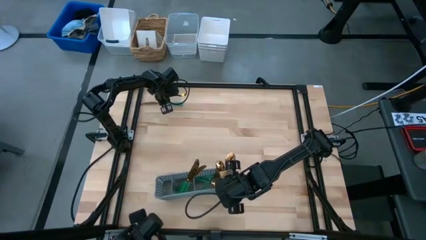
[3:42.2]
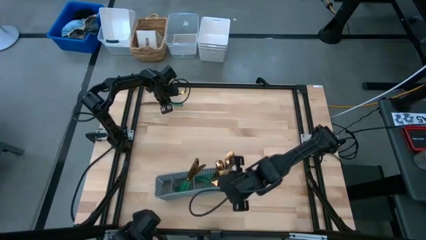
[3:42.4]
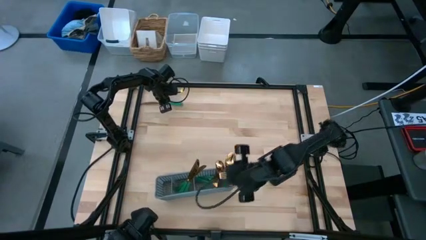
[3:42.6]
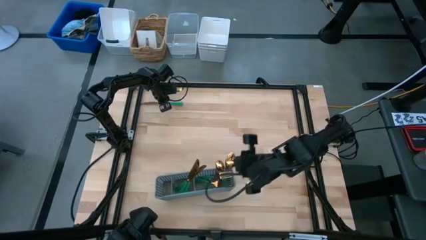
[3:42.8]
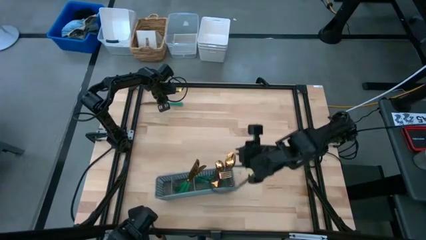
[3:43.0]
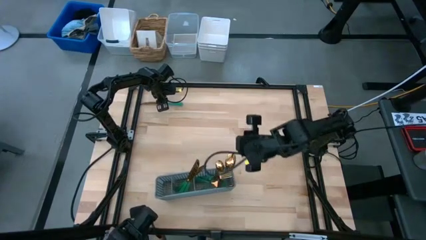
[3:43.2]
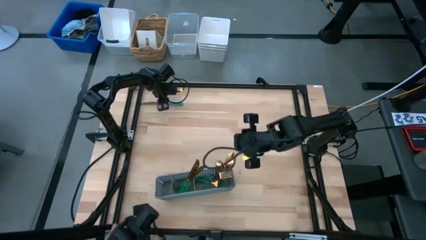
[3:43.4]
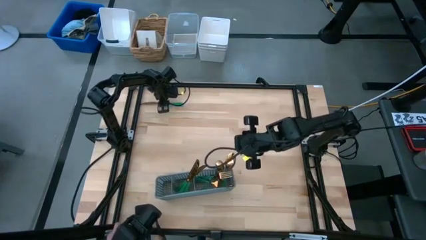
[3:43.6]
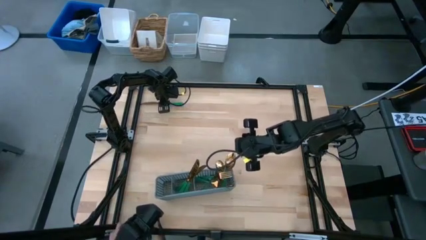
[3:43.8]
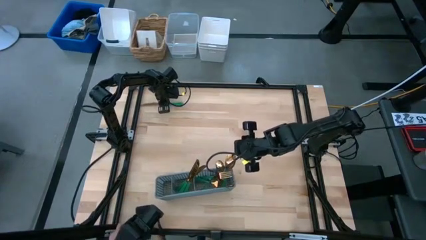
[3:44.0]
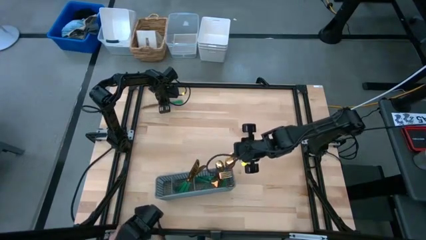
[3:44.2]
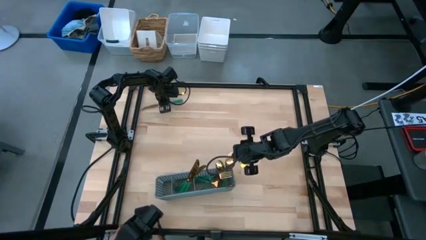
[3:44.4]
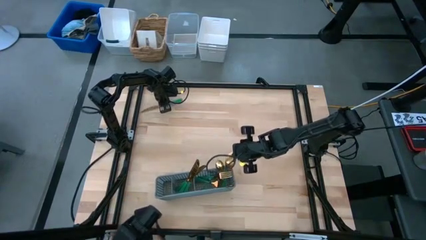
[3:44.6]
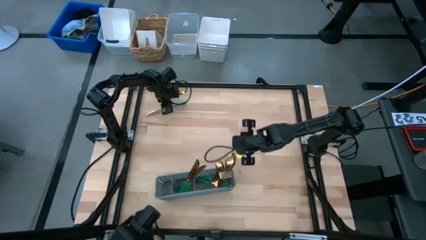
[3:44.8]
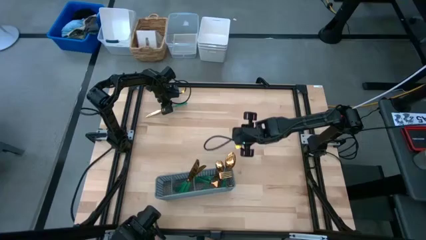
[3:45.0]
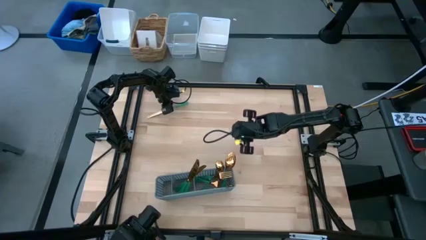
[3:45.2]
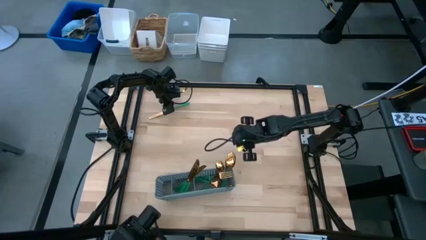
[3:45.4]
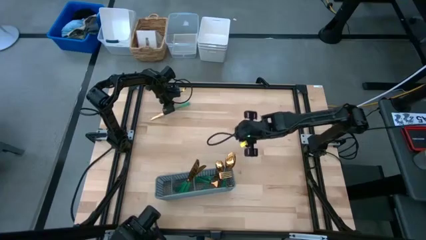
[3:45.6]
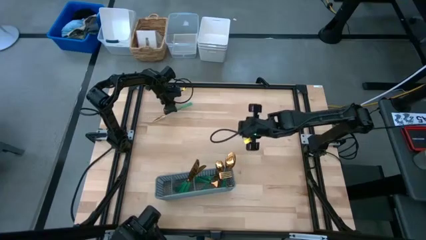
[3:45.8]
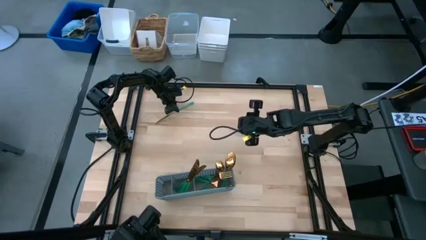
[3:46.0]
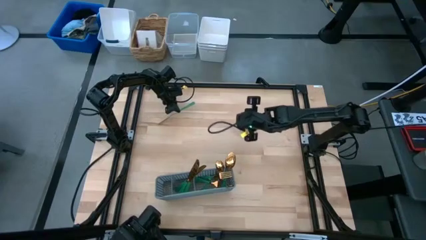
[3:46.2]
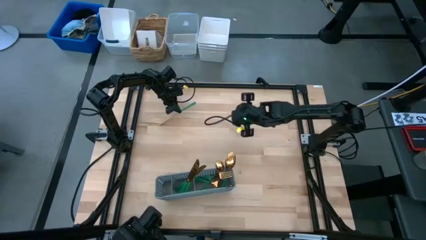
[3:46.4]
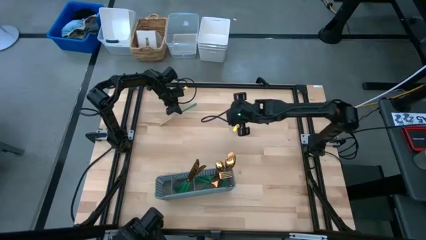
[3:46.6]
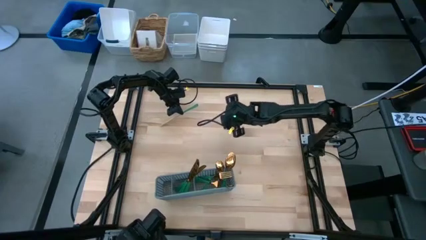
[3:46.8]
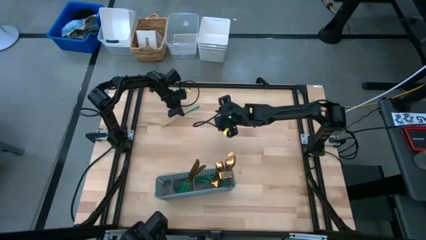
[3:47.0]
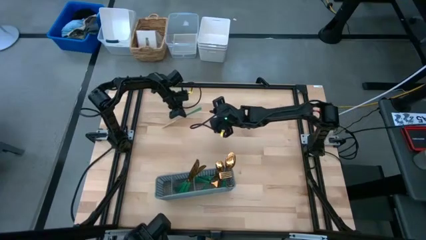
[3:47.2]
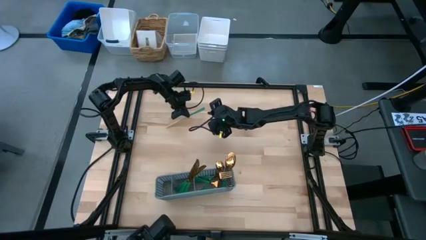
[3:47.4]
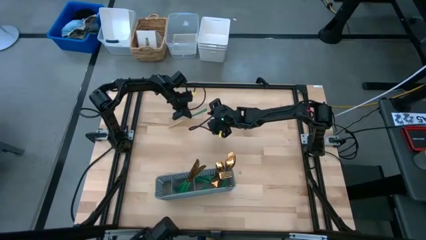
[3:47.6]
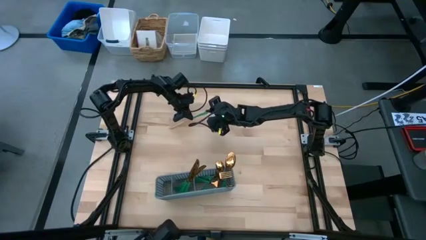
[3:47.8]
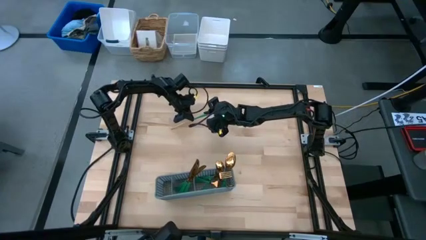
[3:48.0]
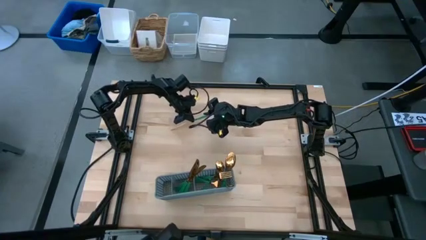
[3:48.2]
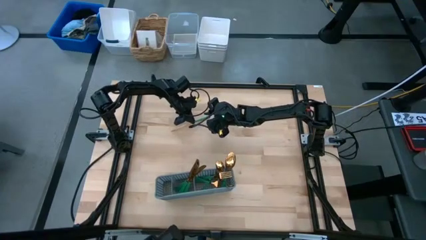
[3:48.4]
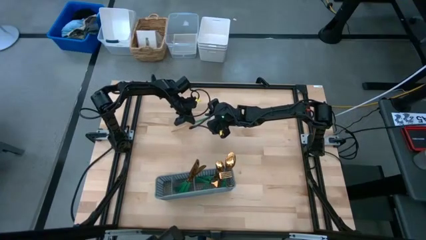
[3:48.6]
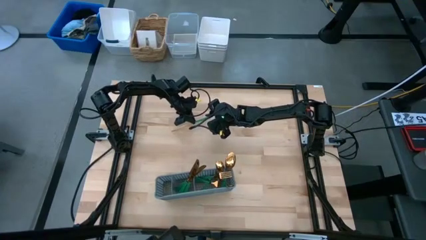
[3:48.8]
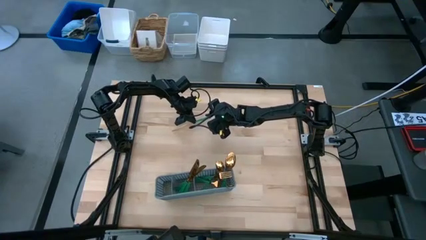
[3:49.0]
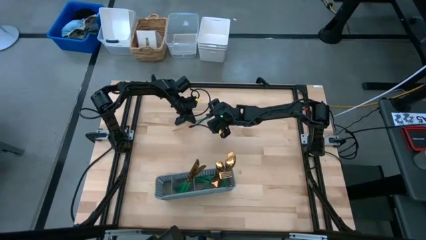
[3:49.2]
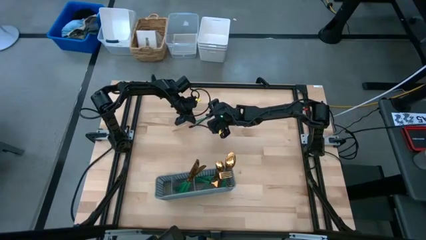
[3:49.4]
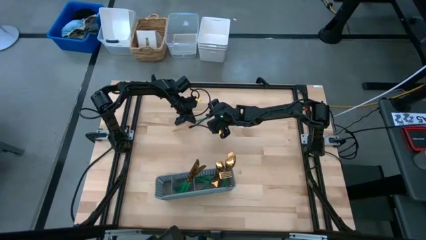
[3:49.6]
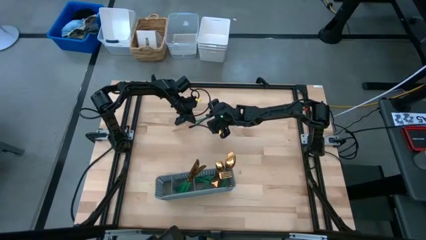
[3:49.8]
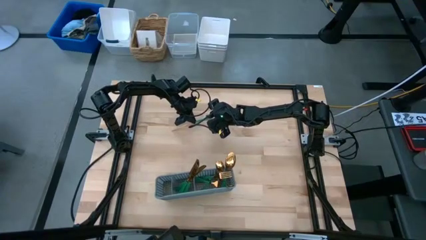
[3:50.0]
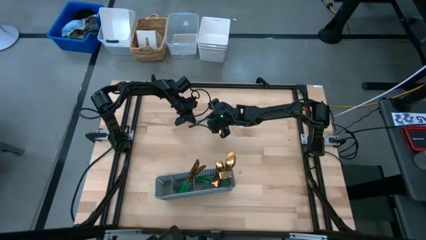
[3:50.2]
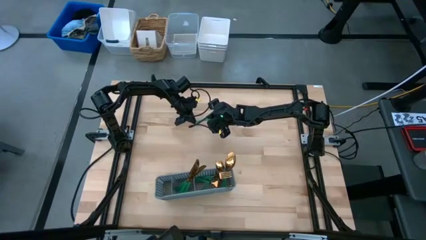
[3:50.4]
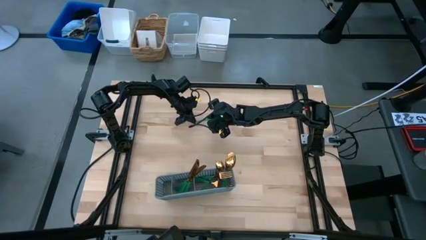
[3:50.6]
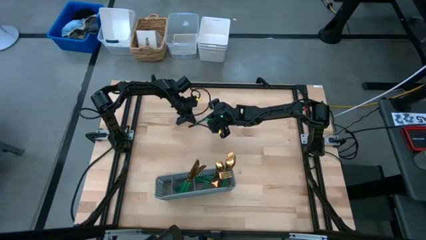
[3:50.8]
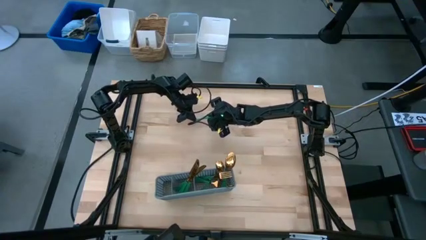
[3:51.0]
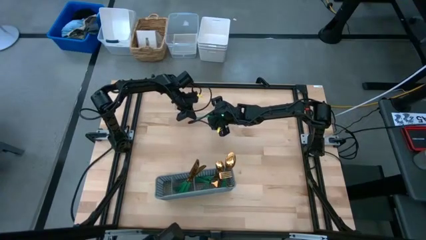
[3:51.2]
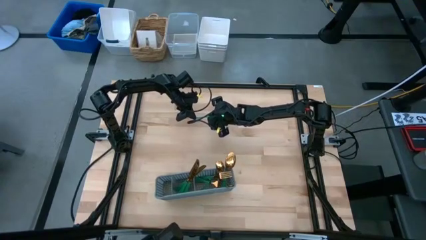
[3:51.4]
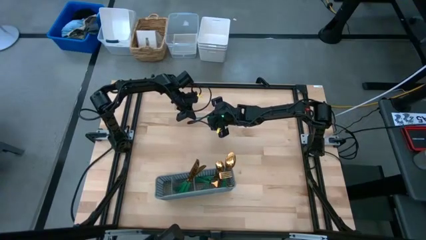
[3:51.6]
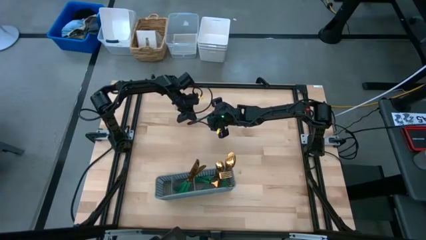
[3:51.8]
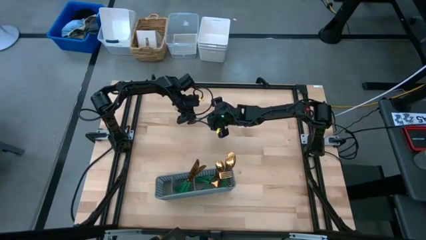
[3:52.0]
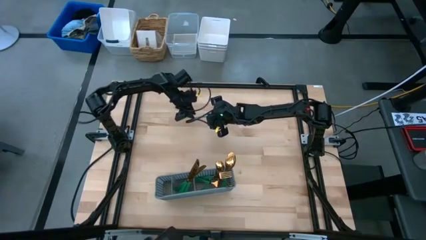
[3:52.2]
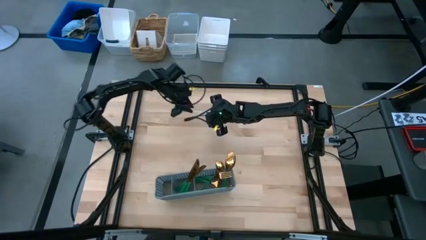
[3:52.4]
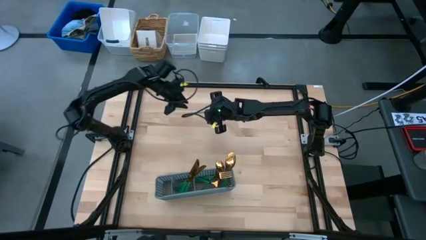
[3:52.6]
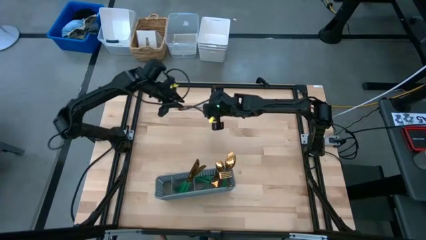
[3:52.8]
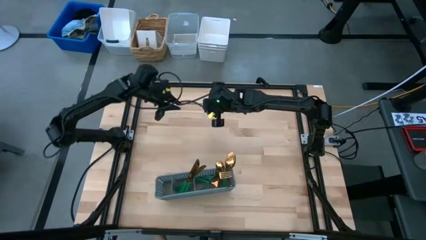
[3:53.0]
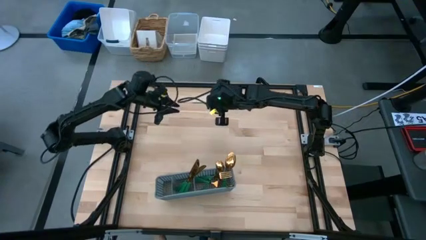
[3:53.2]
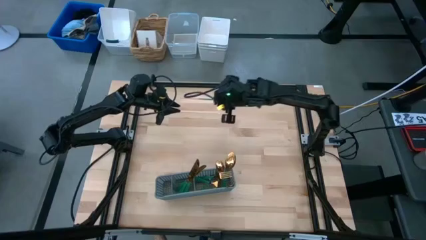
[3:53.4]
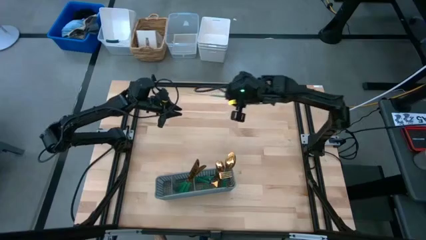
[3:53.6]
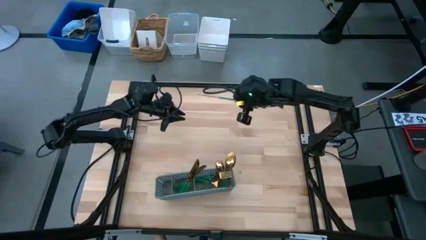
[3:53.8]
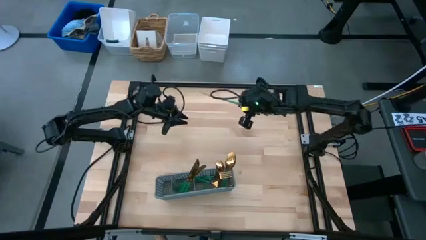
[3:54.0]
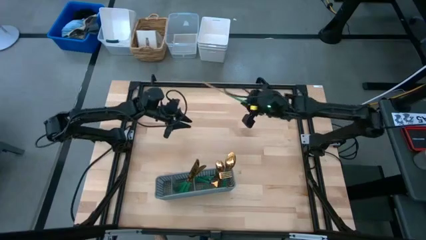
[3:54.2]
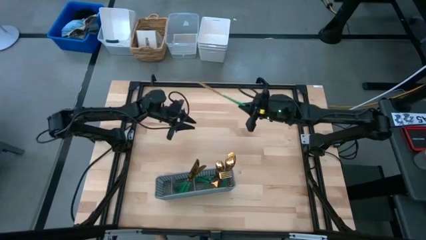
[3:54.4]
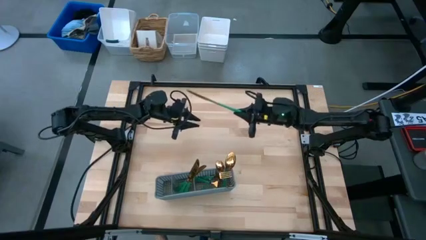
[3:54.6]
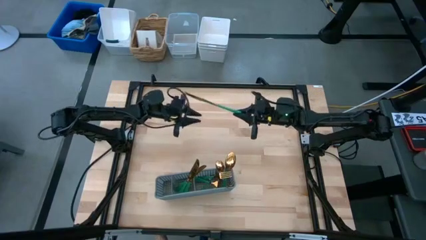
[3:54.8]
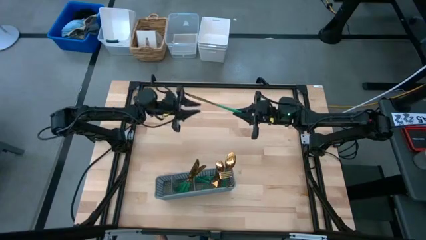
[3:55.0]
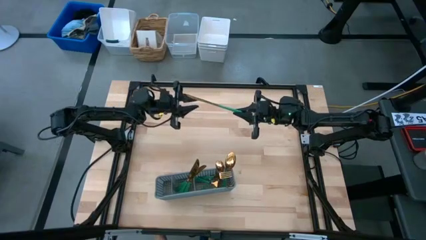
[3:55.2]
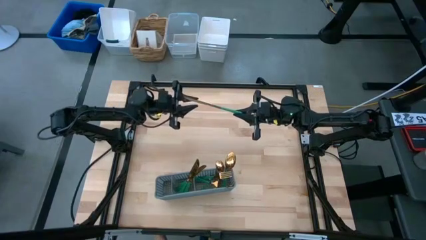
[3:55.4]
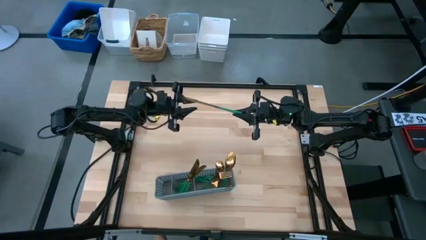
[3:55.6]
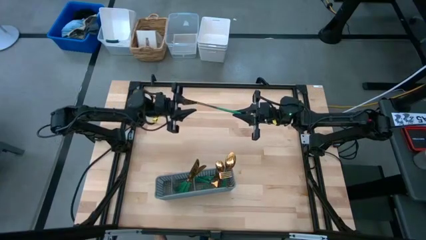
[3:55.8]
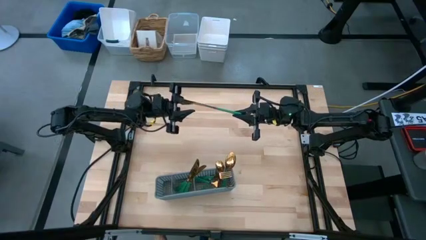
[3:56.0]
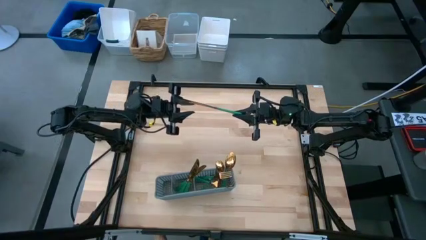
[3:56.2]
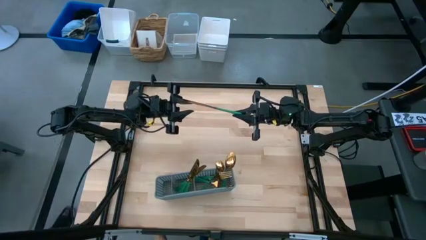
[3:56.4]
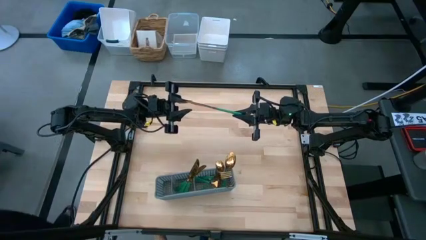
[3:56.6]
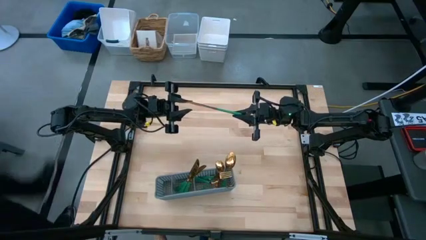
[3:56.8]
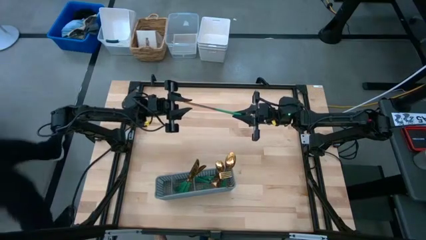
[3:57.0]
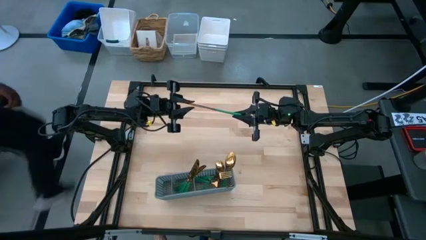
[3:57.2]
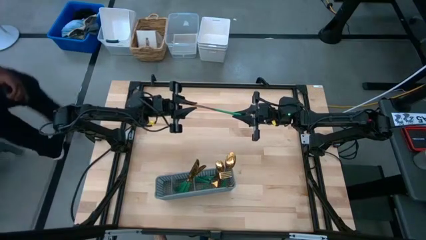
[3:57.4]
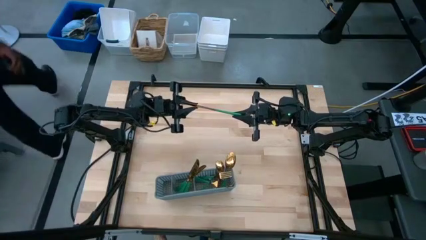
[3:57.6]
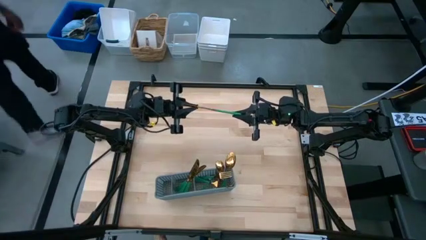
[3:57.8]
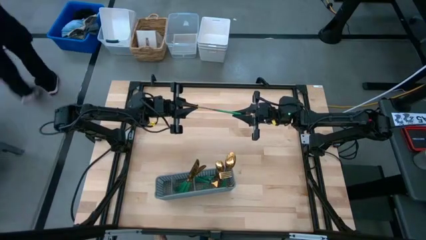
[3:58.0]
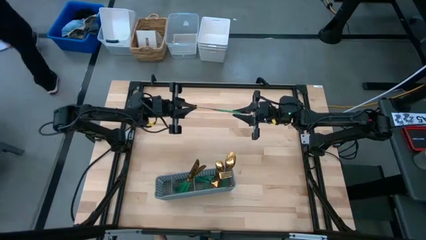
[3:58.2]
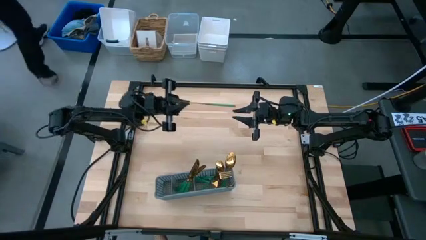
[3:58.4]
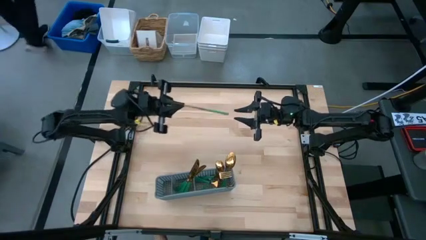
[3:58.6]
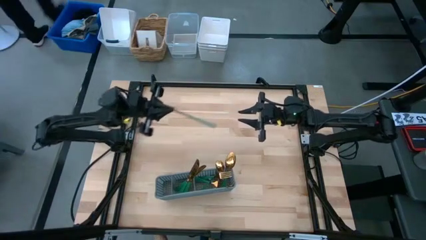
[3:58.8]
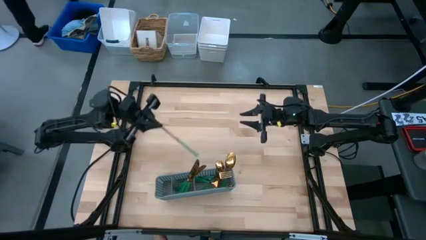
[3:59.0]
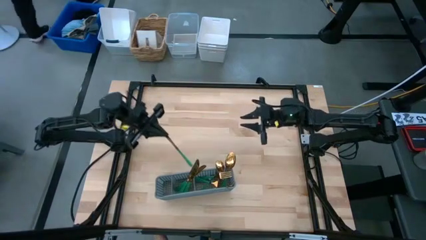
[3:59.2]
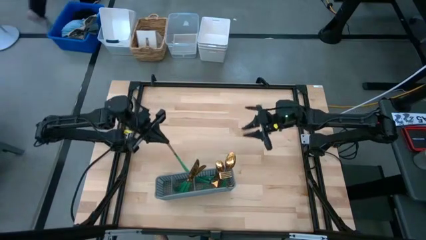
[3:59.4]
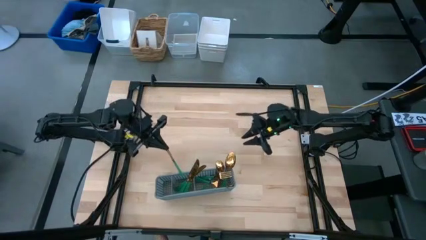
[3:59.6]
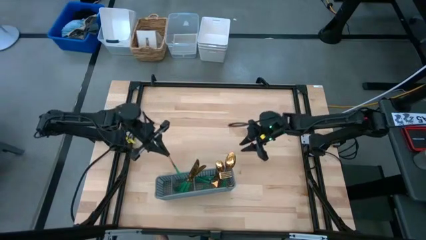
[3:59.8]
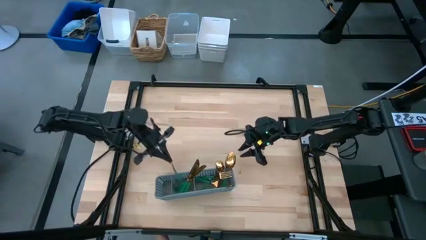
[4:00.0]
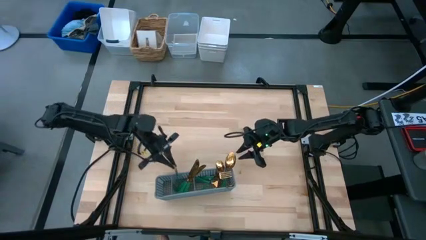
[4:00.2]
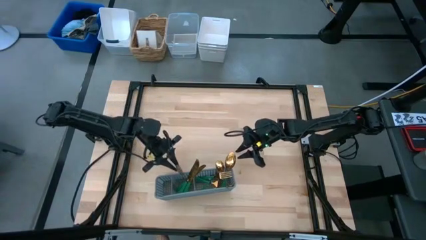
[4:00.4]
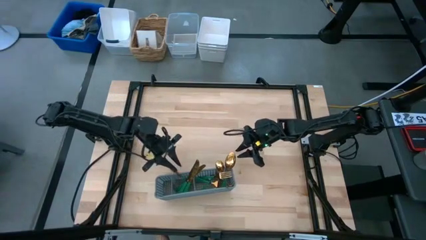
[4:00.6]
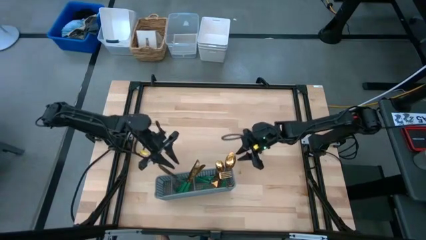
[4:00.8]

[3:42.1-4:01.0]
Task: Sort silverware
Put the knife into the cutlery rack
